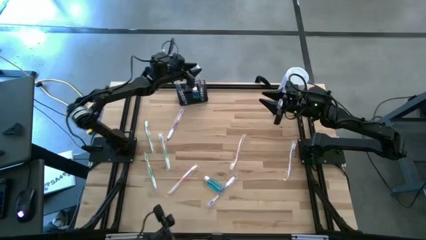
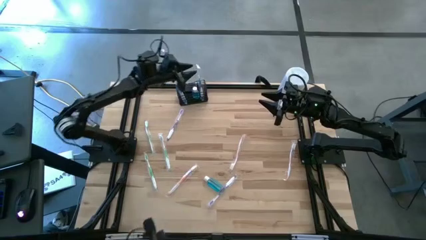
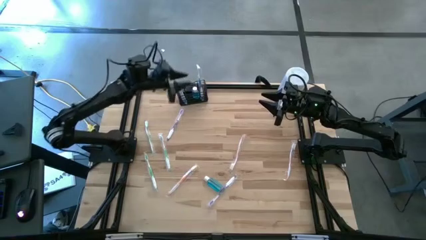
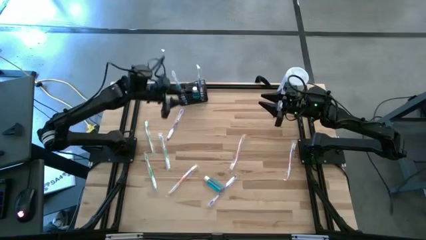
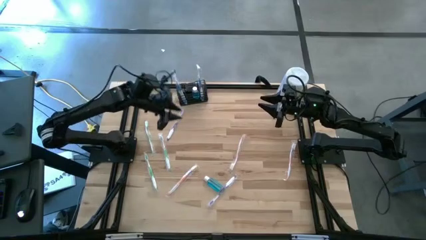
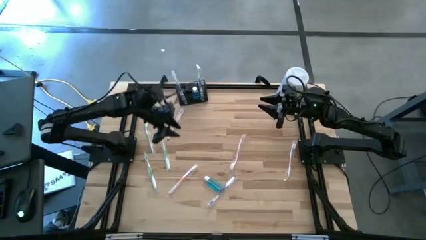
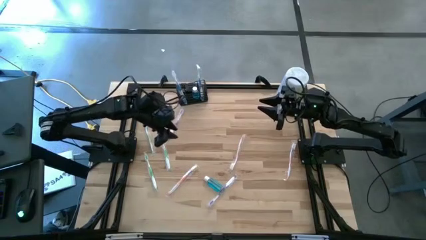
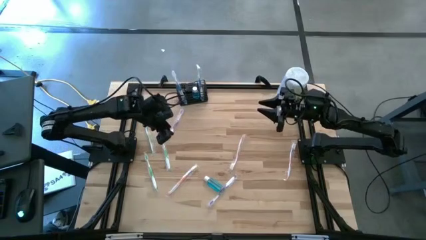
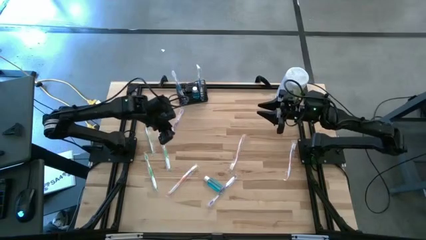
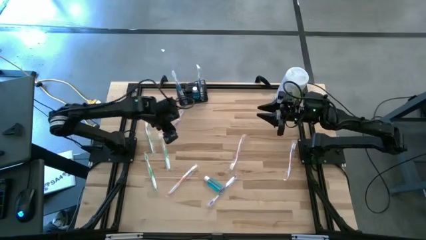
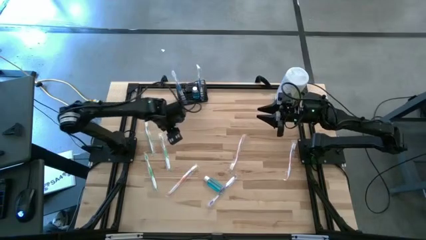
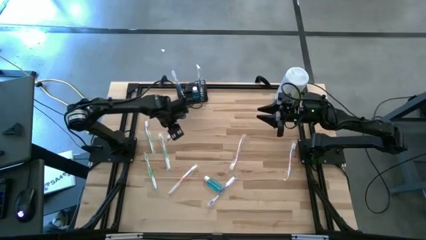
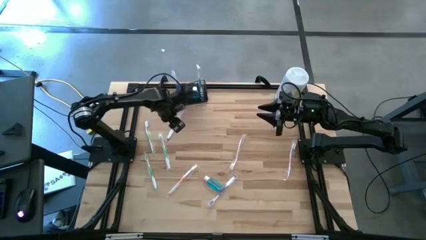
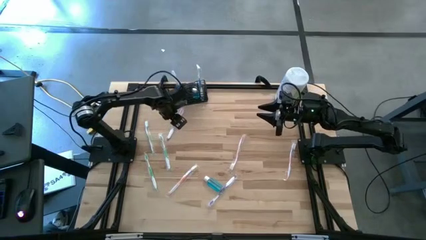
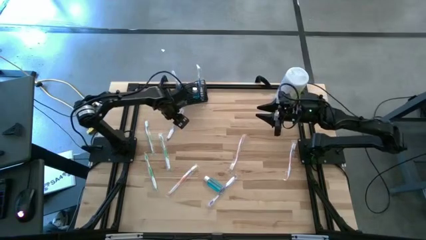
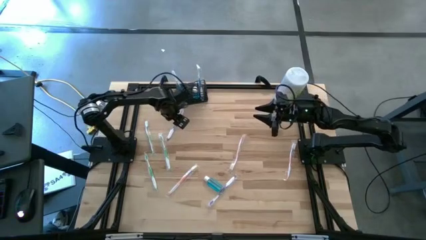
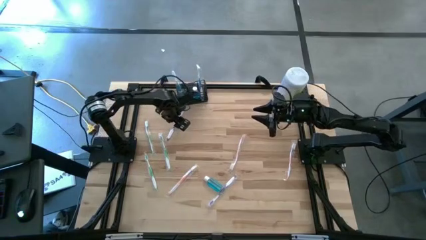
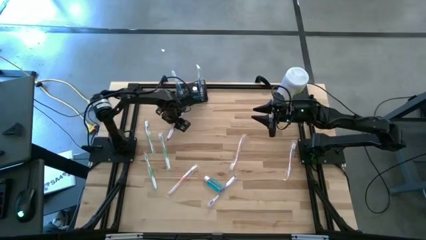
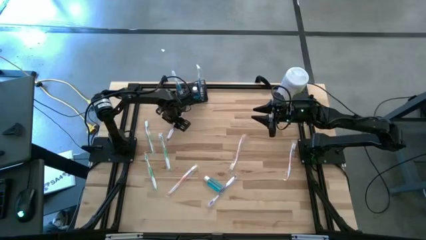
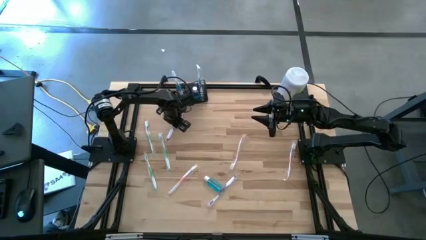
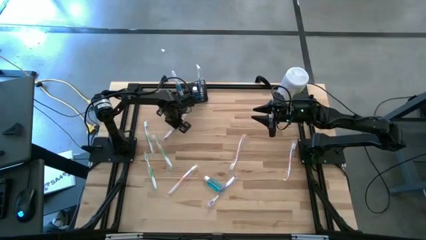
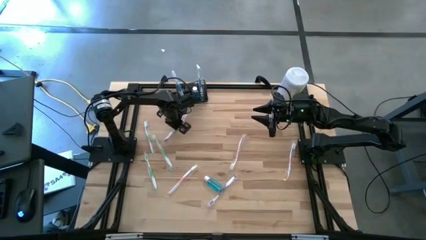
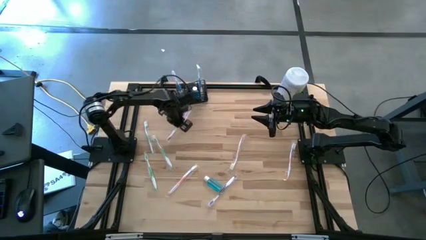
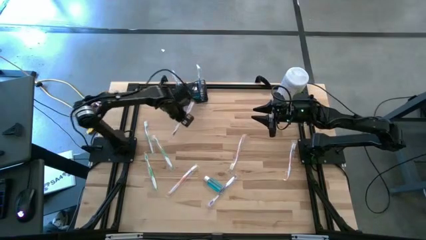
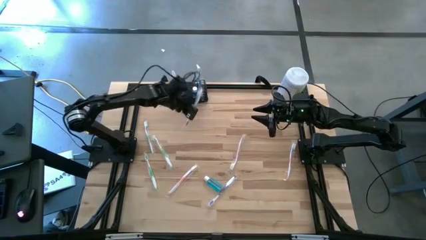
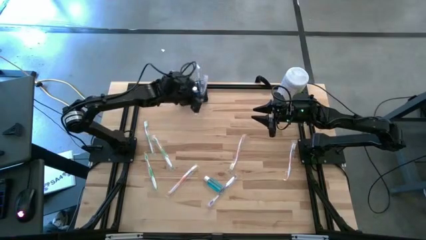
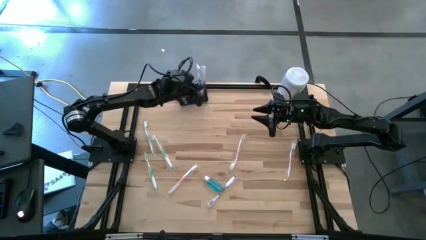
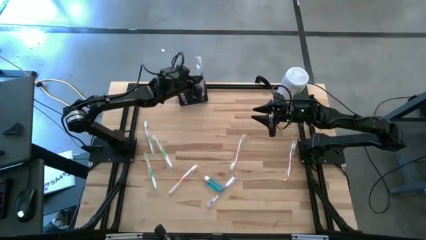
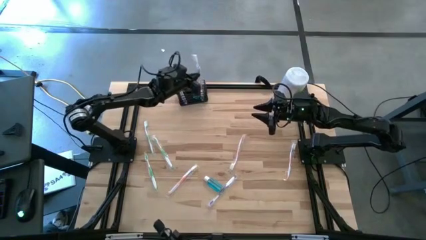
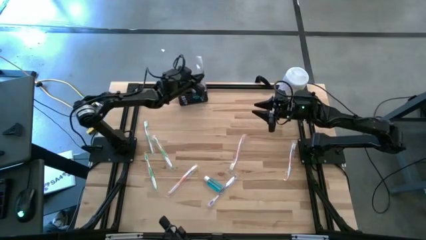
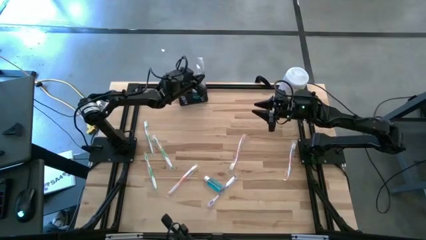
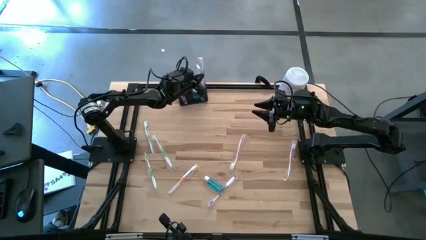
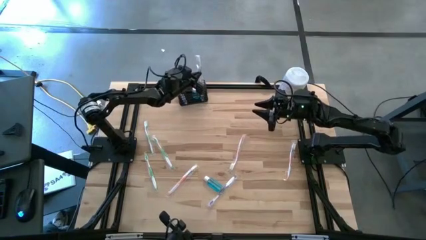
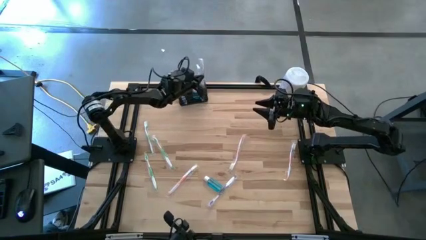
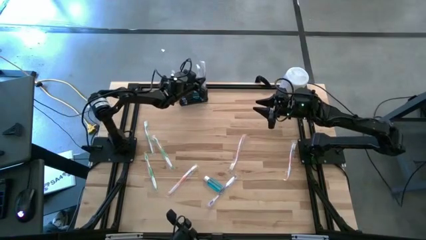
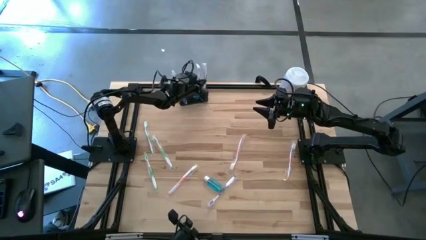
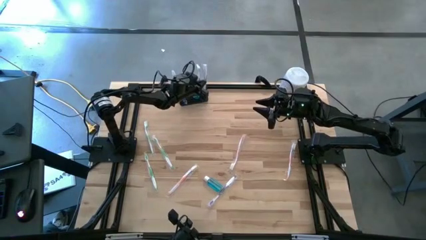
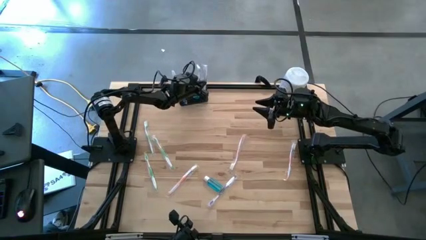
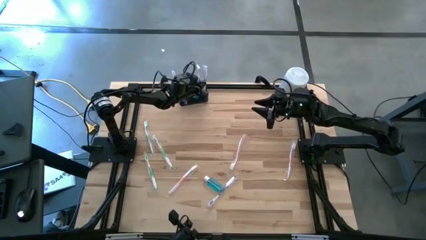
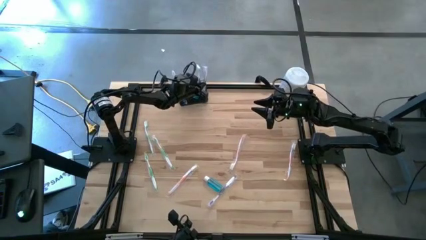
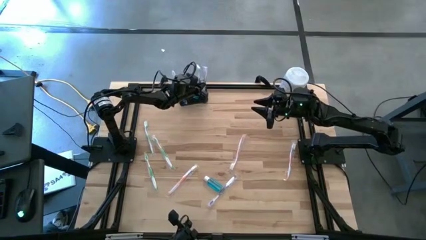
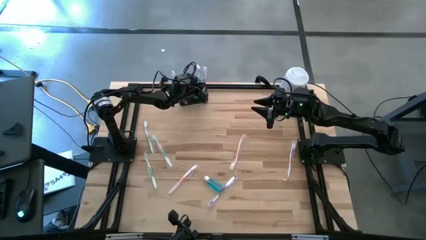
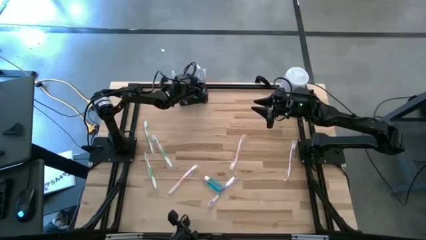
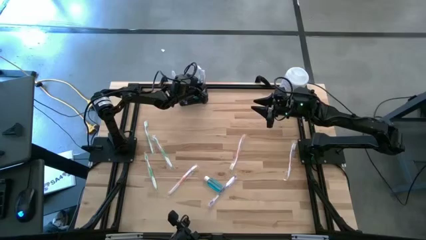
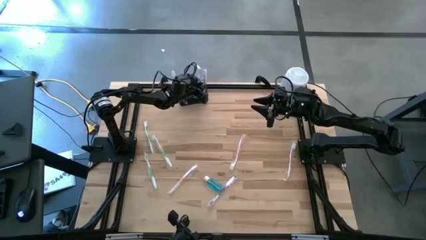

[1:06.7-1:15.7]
Task: Pick & Place toothbrushing station
Put the top violet toothbrush into the black wire organizer

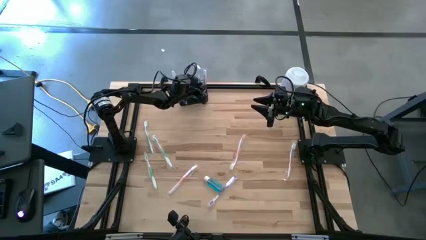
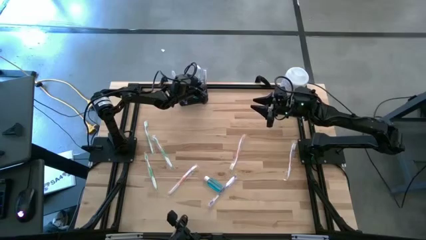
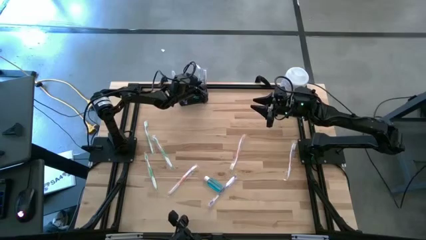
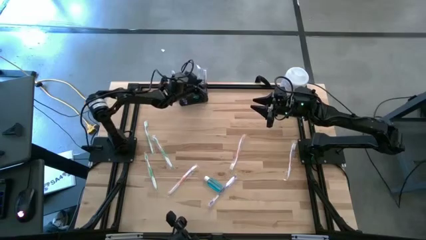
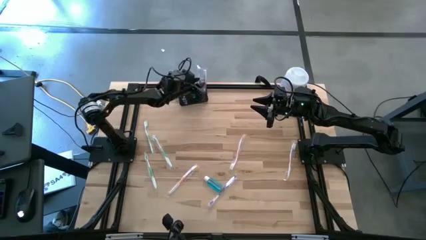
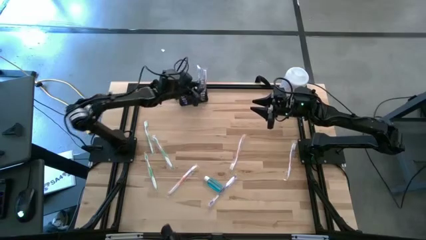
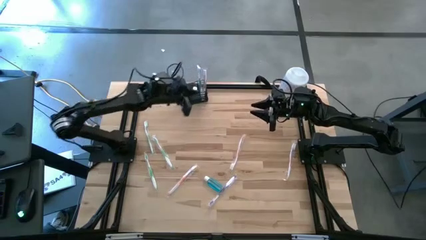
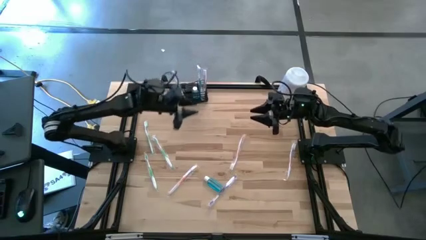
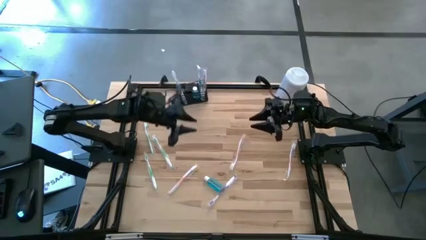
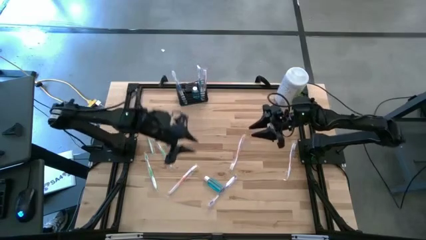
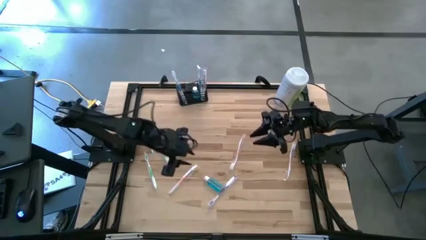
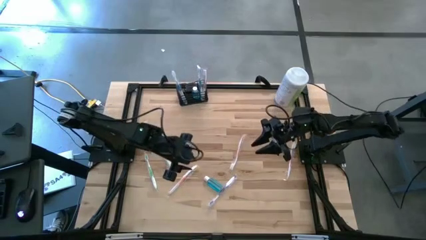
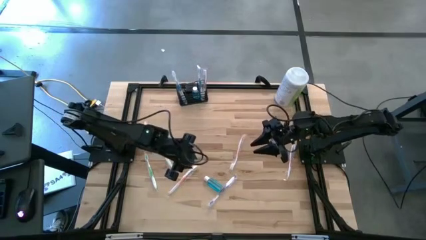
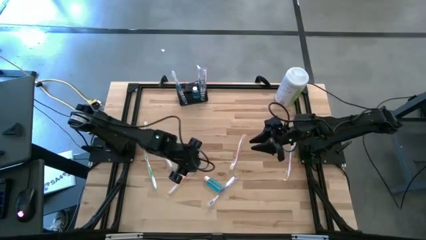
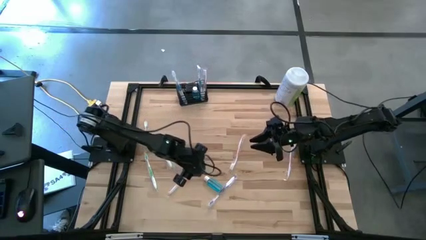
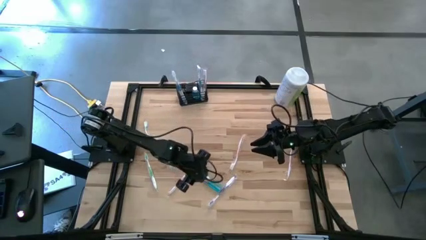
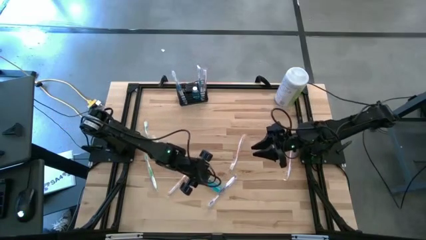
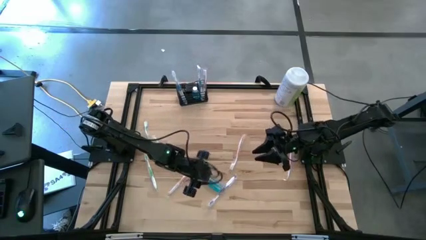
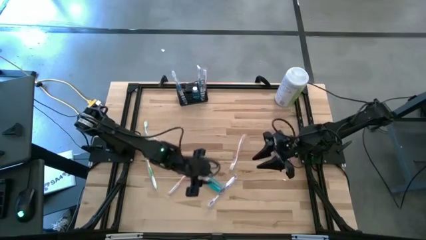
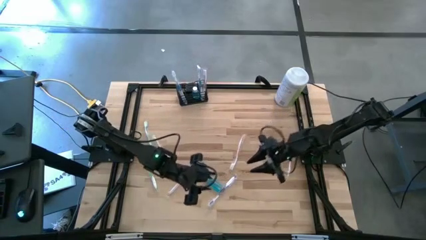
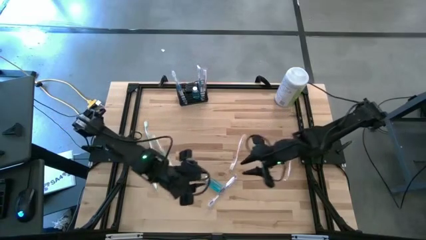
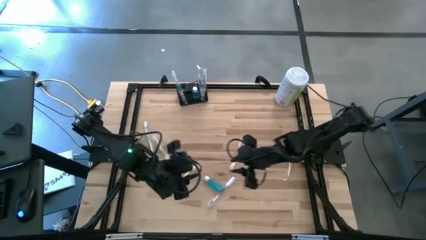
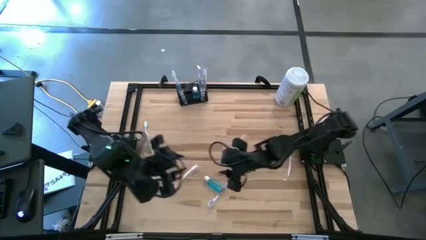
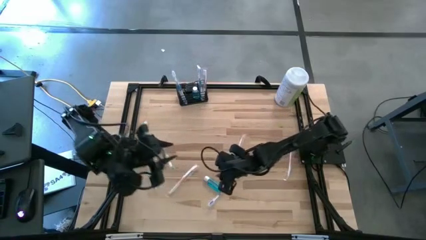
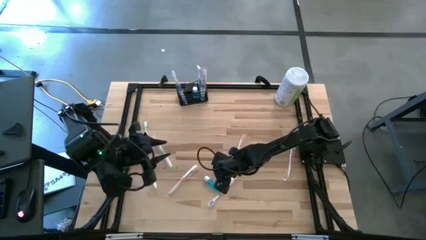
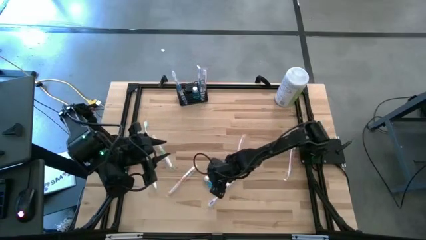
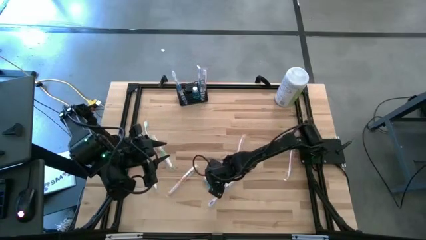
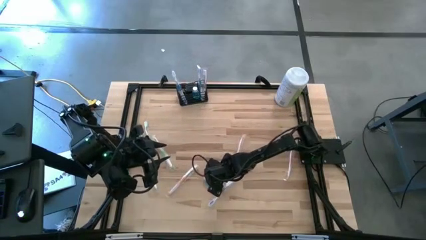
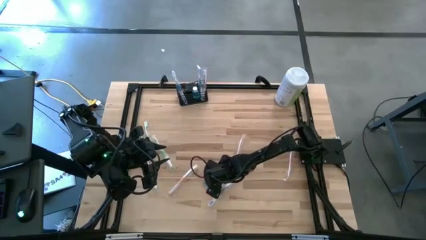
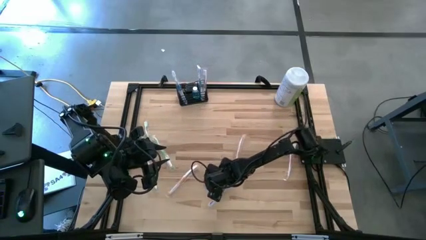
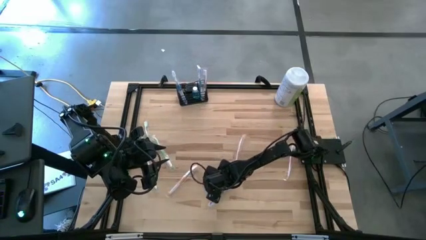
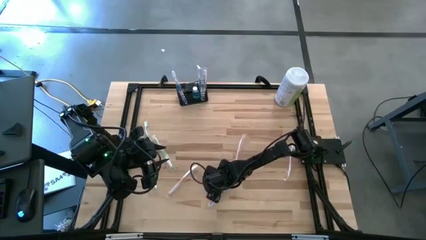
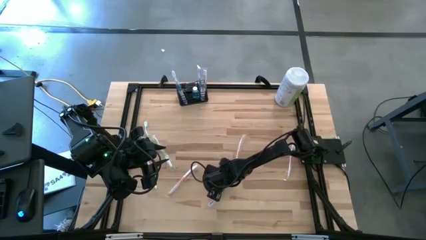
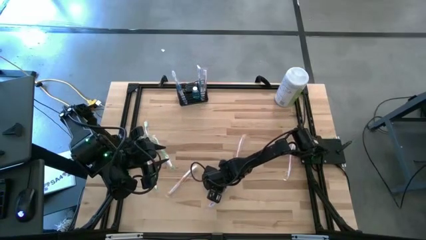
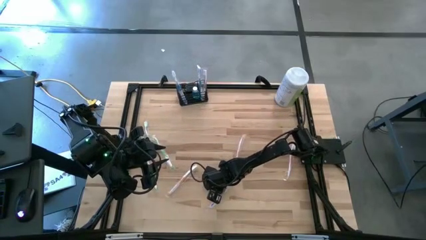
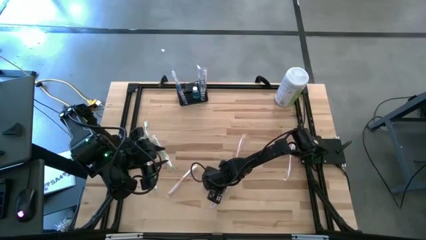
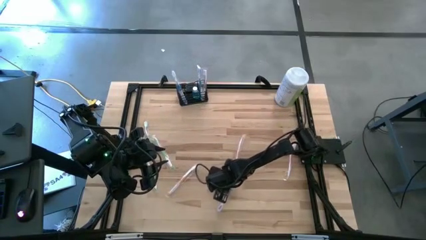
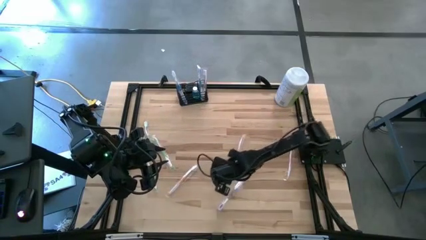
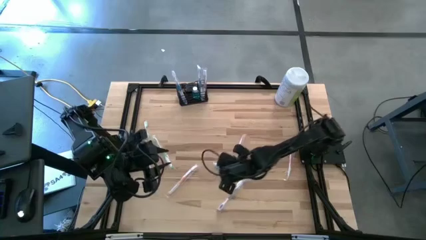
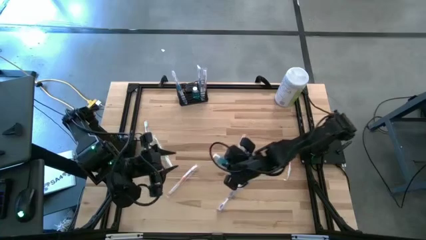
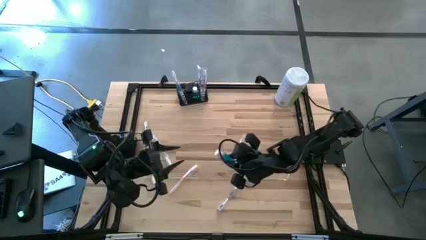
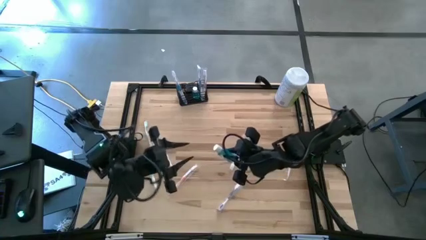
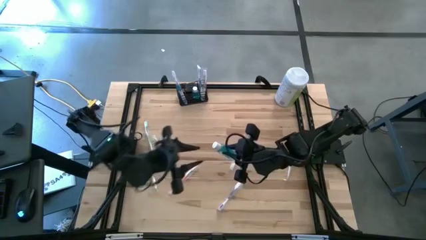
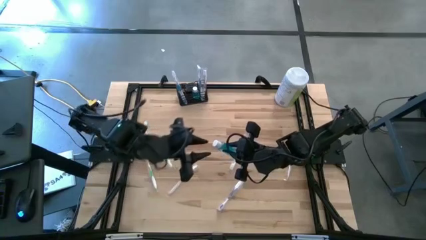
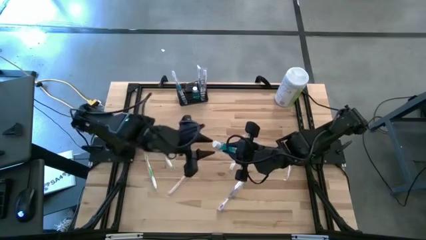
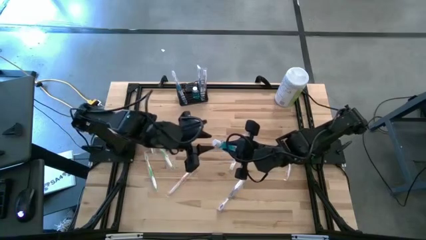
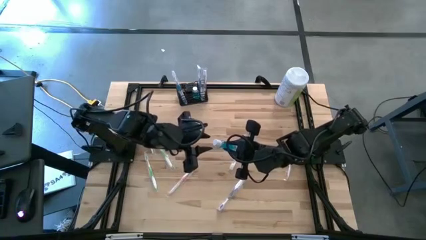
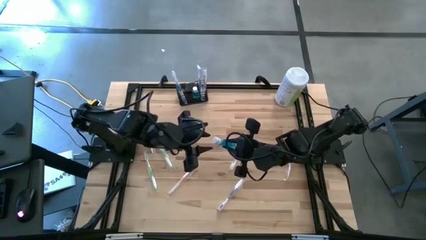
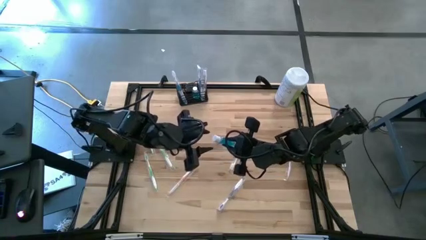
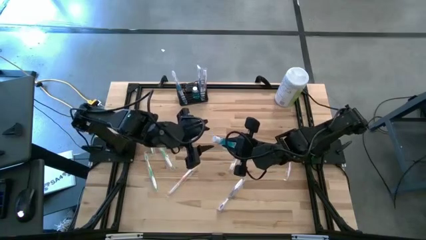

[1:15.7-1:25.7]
Put the blue mouthwash into the black wire organizer
